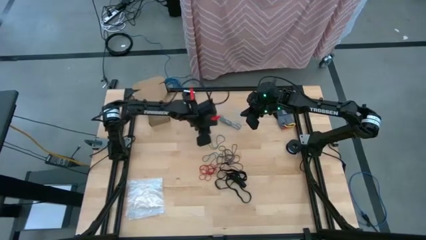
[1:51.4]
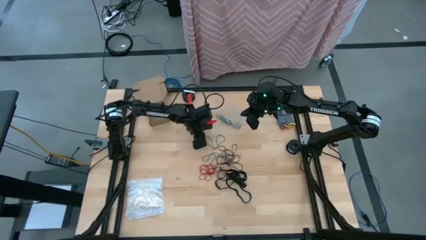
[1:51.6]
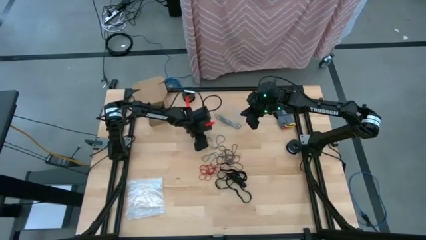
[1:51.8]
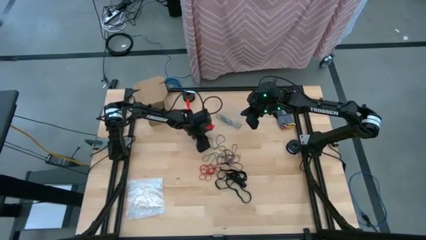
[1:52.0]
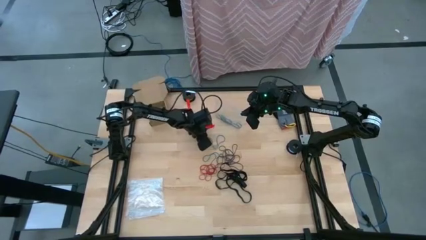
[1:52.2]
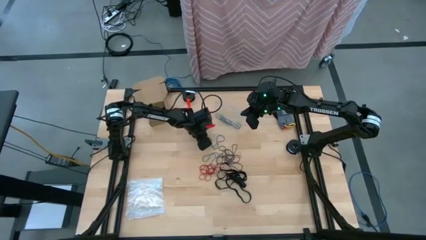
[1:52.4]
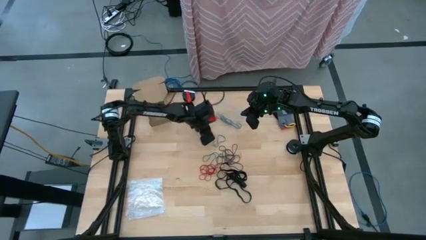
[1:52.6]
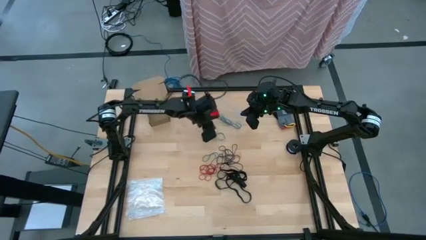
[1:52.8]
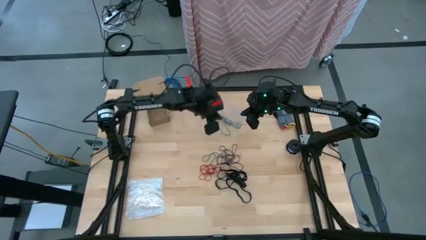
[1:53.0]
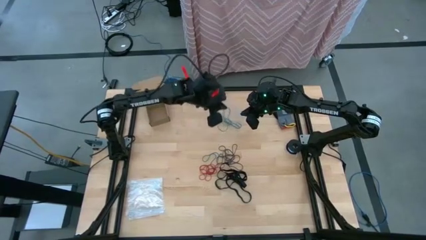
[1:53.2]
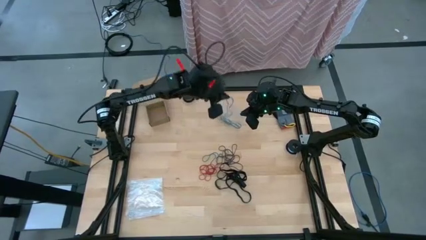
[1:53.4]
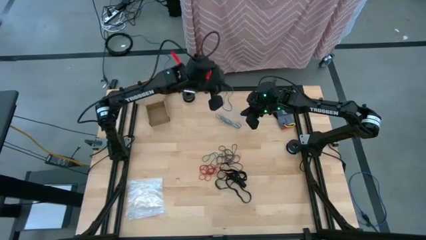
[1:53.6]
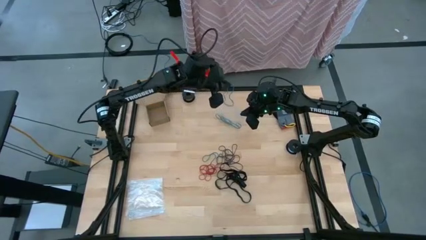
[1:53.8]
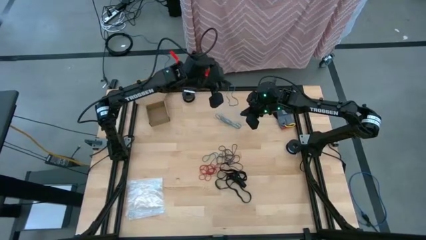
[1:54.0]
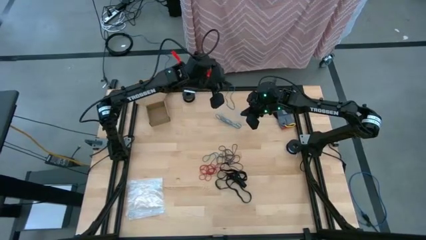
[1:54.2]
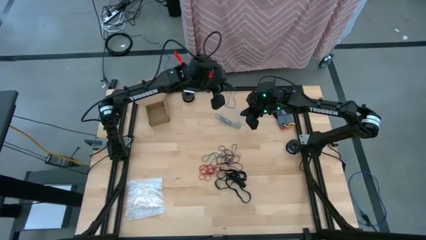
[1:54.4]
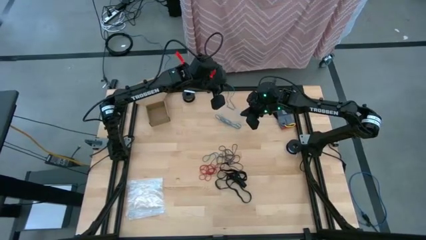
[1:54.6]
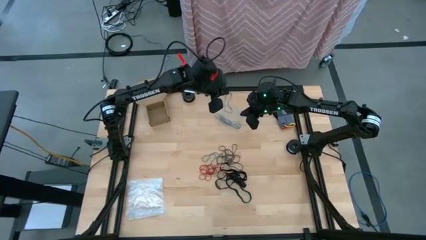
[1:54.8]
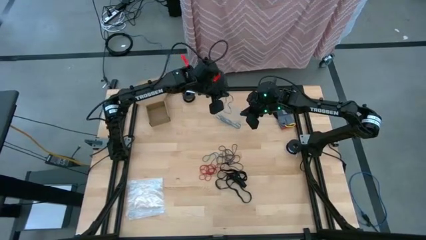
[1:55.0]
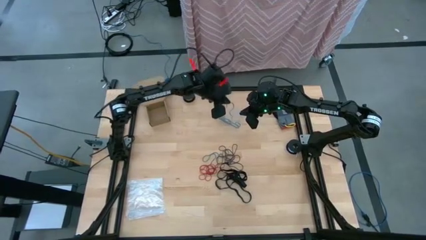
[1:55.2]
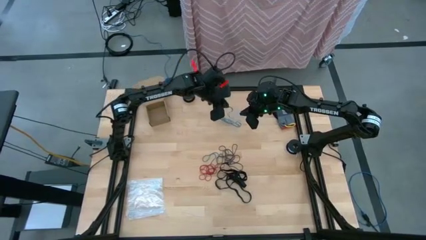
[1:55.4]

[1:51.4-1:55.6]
Task: Sort rubber bands
Put the blue rubber band into the transparent zip bag

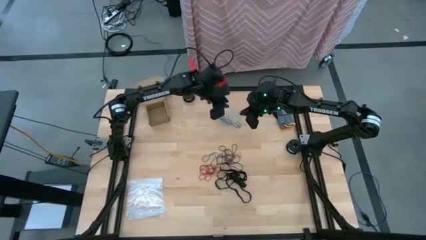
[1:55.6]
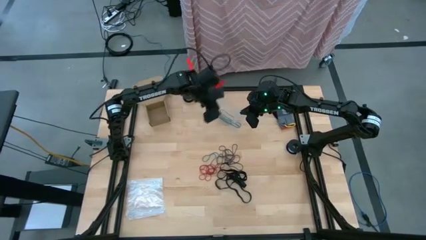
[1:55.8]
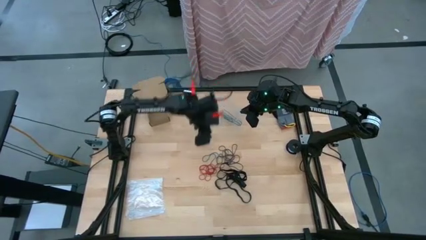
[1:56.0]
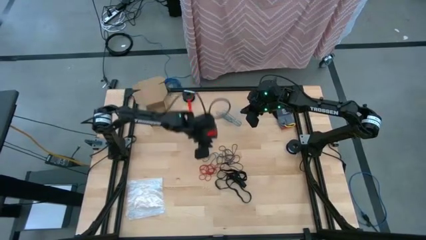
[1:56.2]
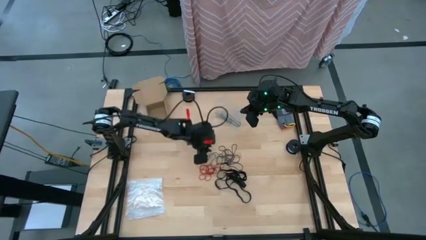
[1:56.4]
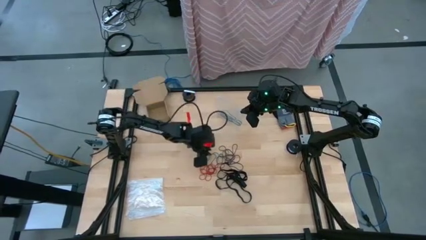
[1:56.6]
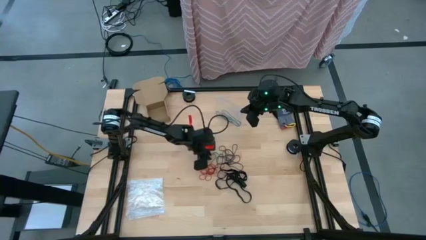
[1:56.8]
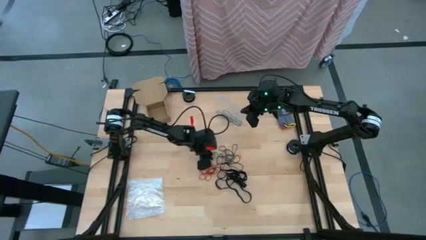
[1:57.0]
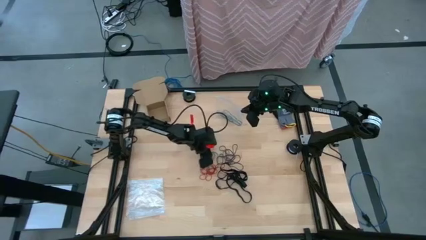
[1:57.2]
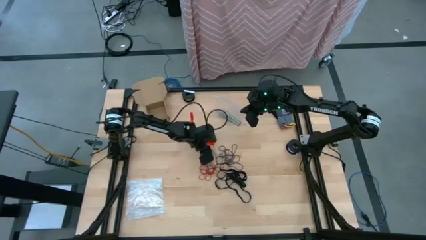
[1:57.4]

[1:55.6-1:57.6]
Put the blue rubber band into the transparent zip bag

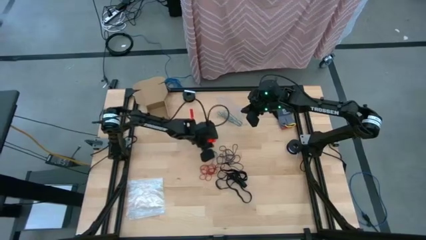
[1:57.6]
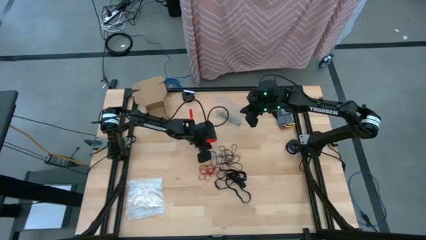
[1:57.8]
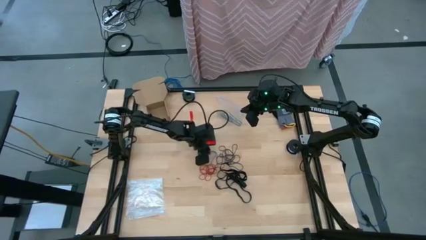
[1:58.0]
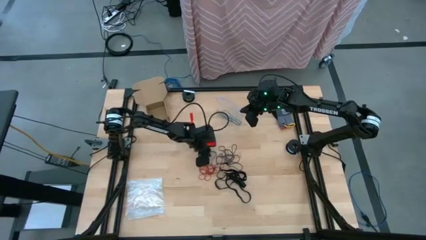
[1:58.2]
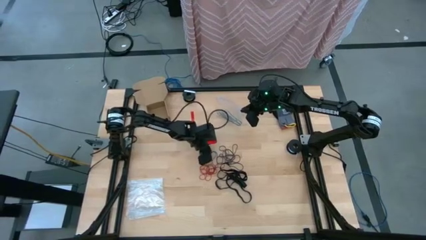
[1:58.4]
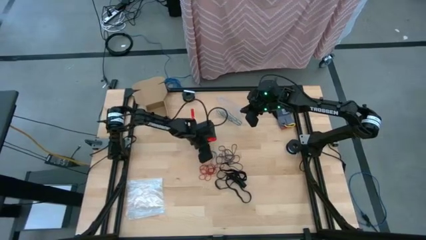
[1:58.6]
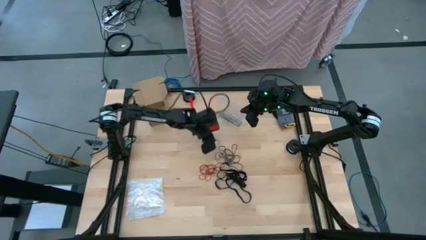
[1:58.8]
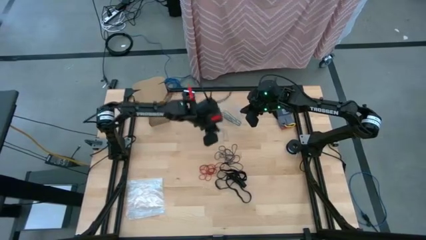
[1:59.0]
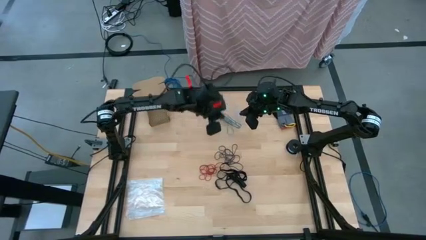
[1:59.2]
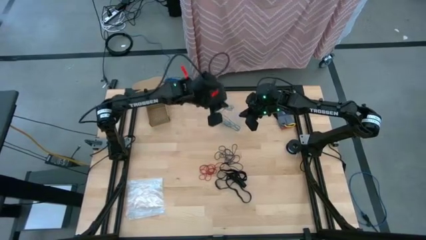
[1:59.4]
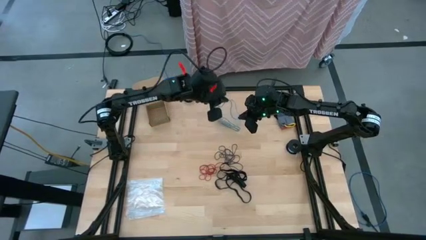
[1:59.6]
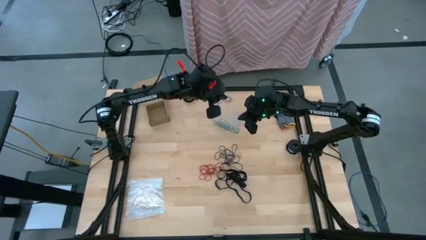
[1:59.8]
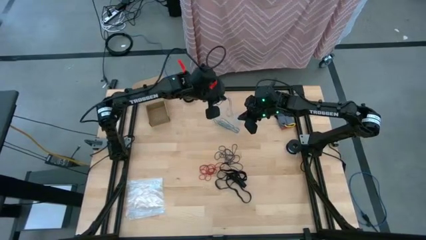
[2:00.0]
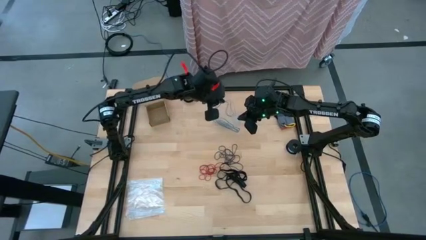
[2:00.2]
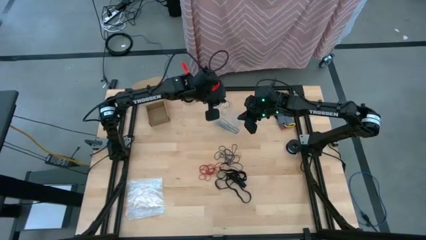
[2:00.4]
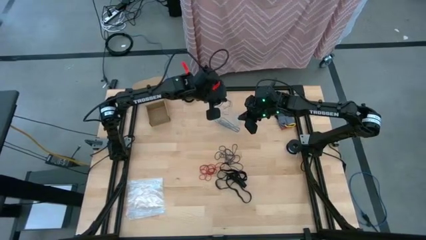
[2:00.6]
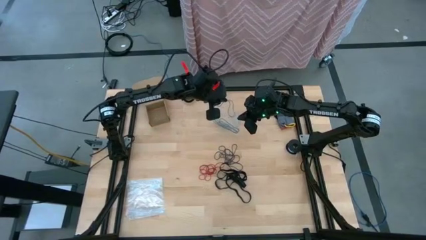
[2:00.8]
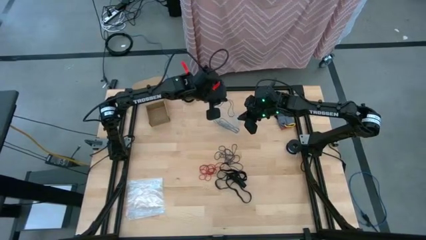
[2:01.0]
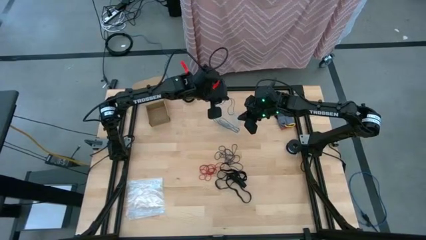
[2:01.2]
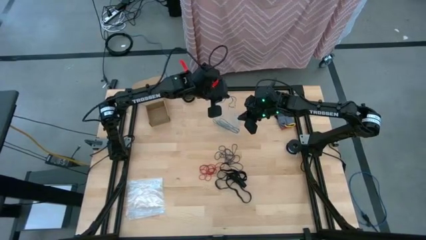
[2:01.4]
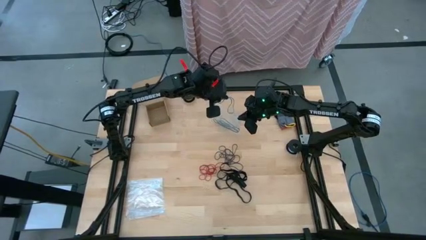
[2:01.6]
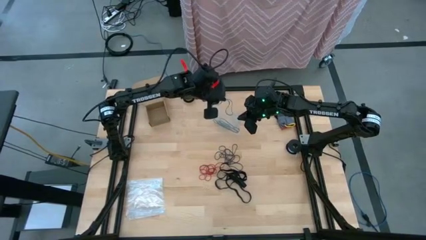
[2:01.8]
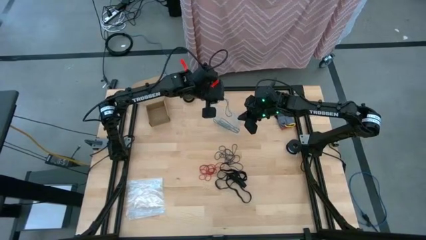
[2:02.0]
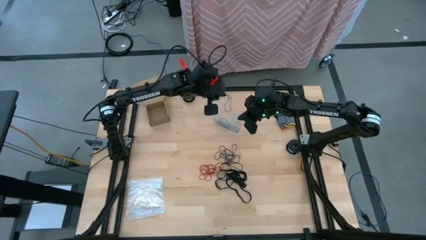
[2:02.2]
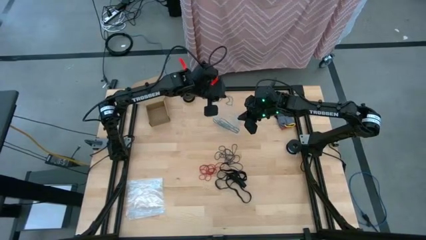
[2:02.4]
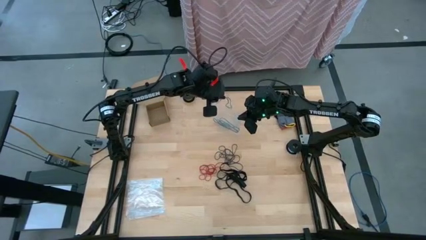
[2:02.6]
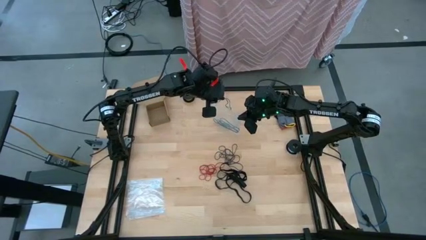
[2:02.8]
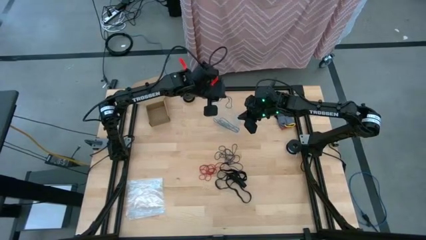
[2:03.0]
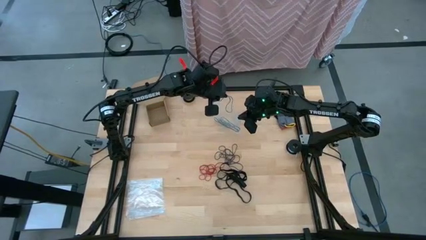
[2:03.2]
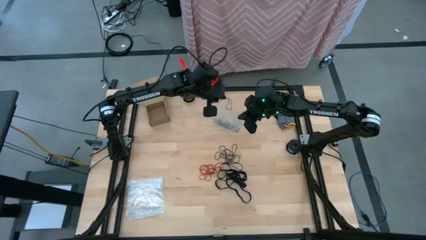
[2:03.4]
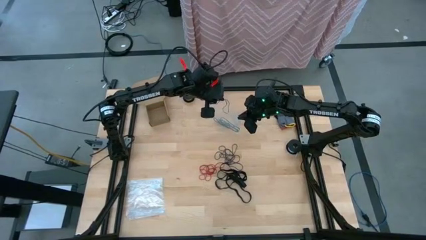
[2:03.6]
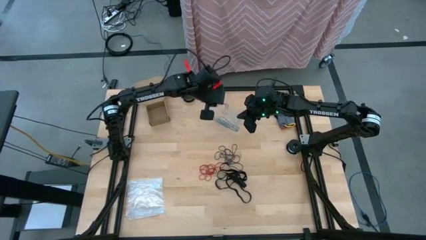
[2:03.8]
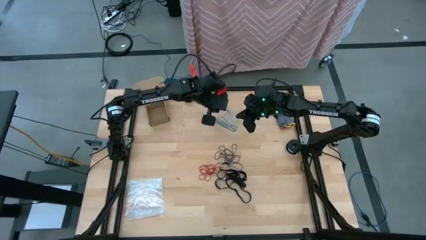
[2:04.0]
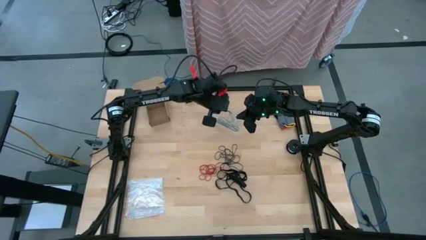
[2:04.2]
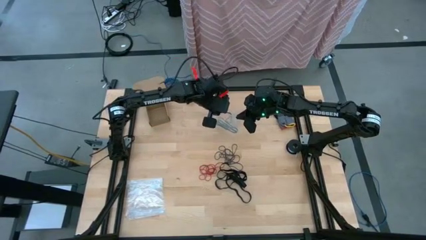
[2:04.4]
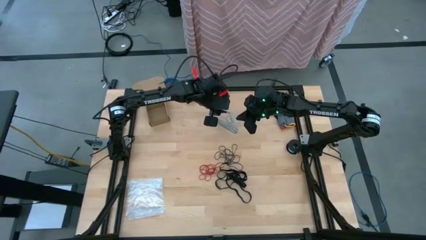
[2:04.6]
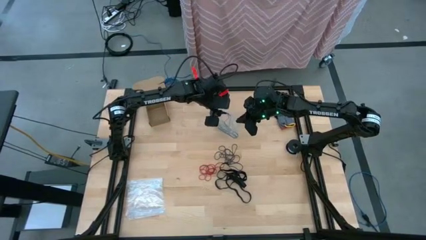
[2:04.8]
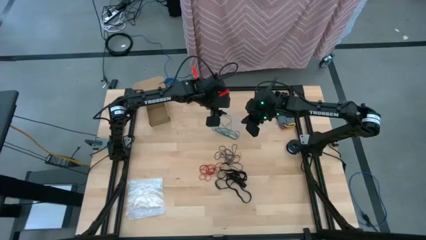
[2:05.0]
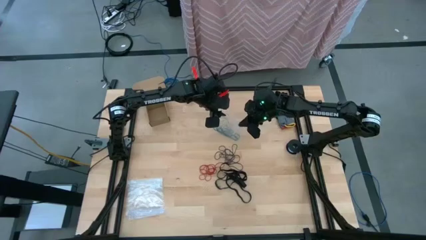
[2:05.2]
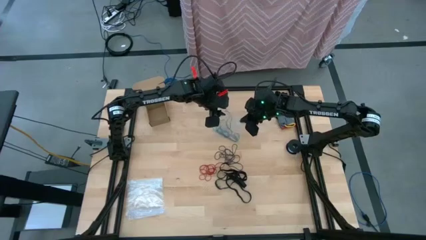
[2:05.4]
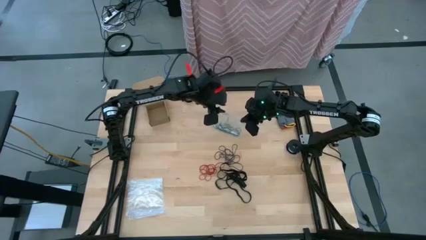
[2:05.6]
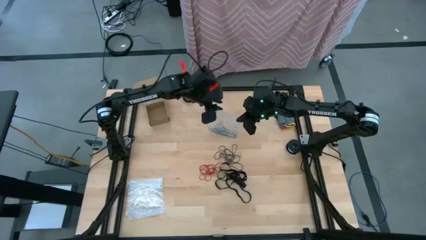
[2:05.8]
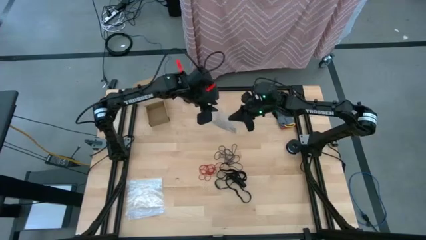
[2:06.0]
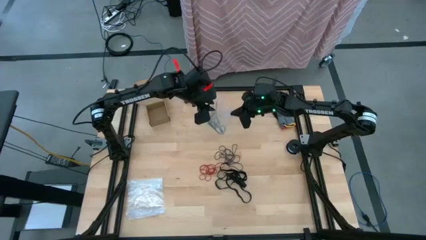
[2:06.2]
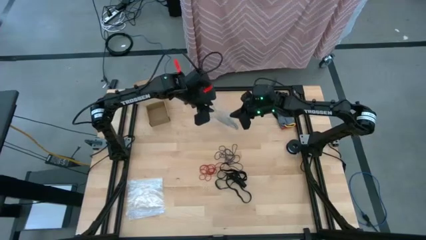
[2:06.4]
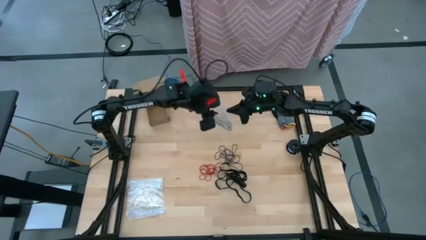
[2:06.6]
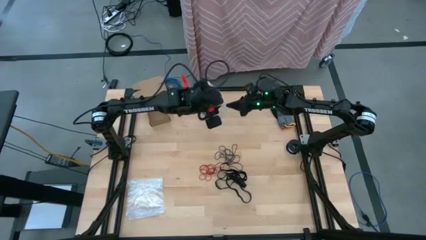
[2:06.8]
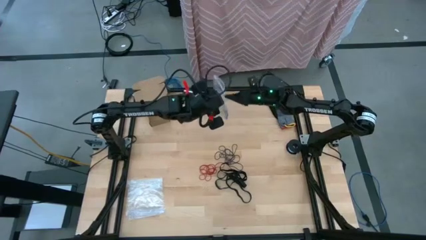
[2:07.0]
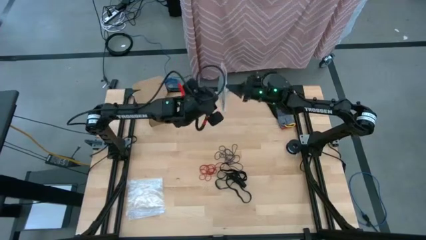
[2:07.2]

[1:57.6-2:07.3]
Put the blue rubber band into the transparent zip bag
